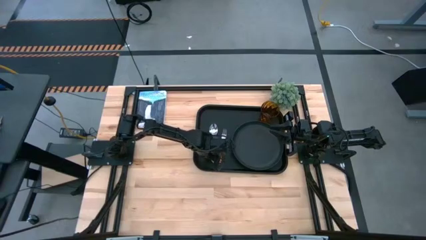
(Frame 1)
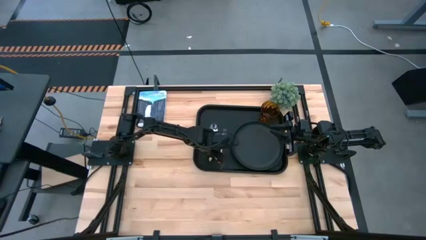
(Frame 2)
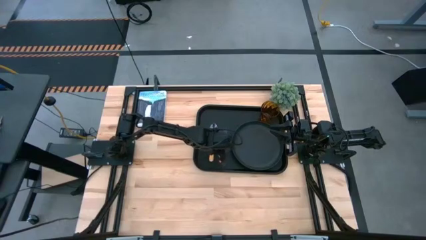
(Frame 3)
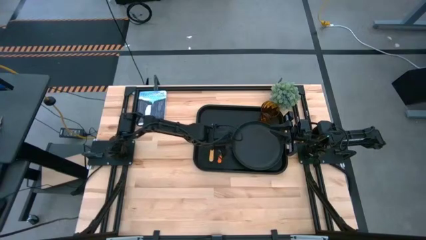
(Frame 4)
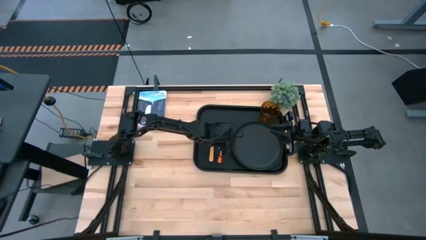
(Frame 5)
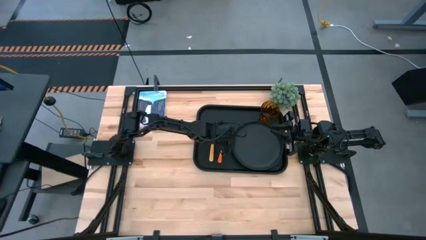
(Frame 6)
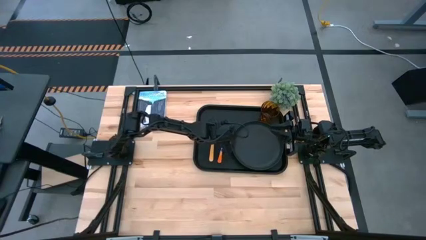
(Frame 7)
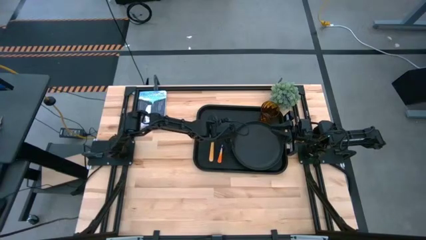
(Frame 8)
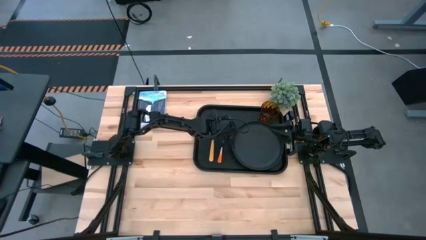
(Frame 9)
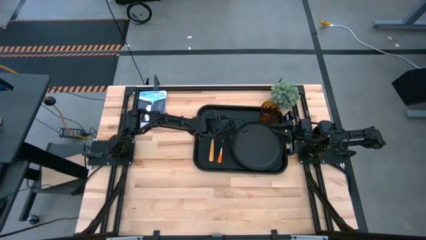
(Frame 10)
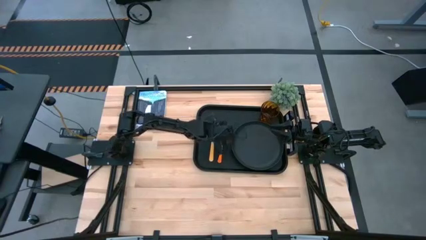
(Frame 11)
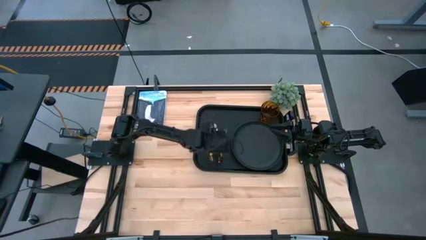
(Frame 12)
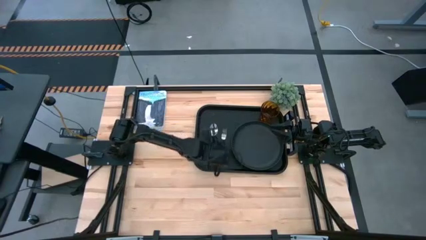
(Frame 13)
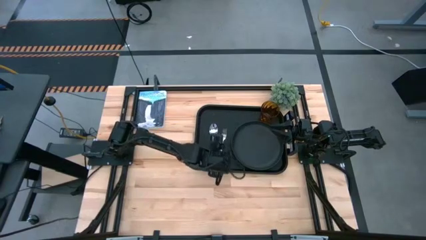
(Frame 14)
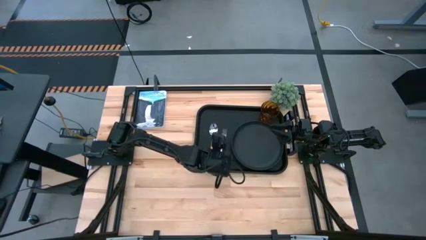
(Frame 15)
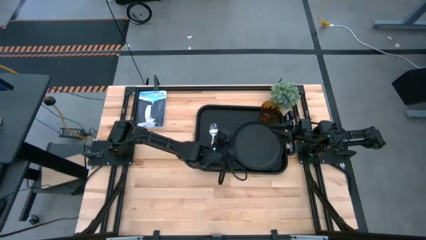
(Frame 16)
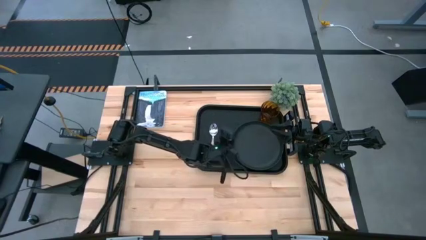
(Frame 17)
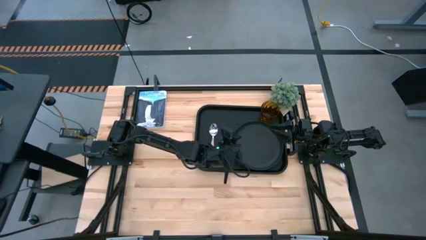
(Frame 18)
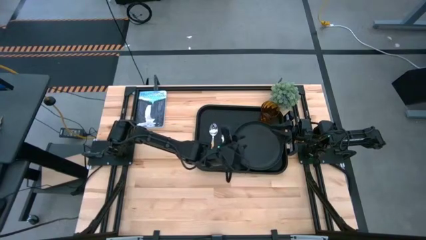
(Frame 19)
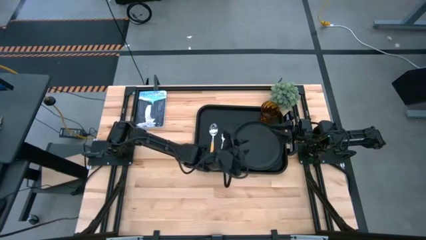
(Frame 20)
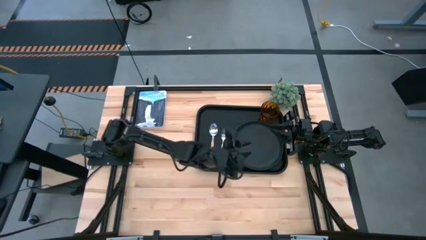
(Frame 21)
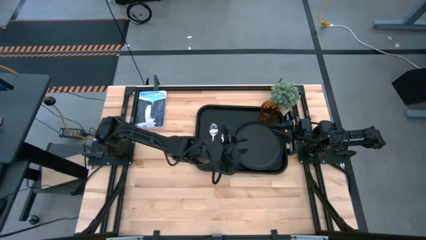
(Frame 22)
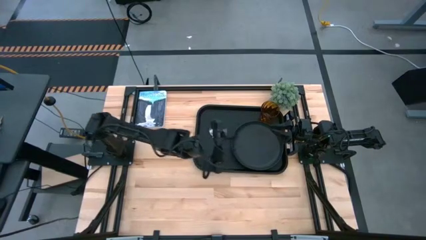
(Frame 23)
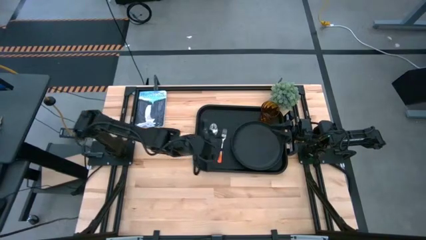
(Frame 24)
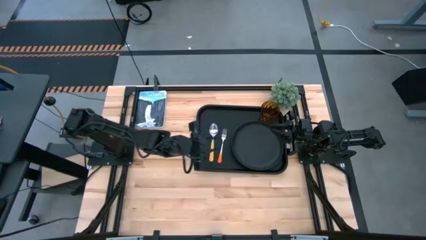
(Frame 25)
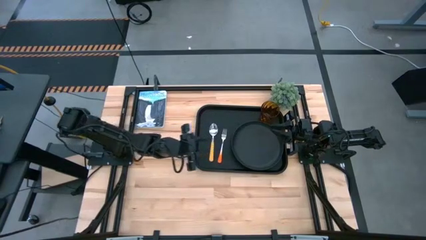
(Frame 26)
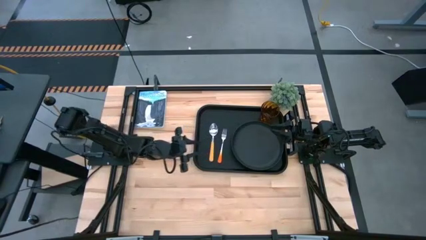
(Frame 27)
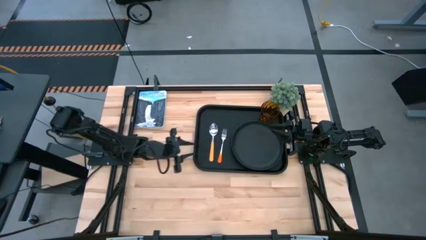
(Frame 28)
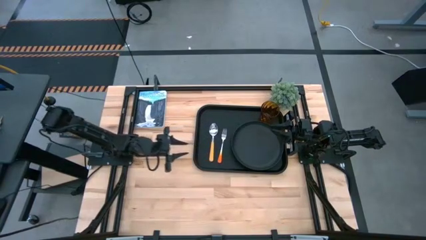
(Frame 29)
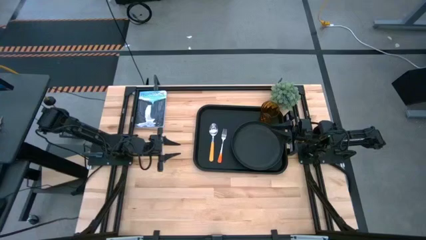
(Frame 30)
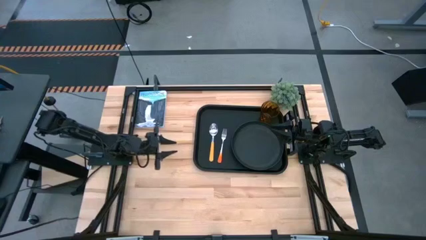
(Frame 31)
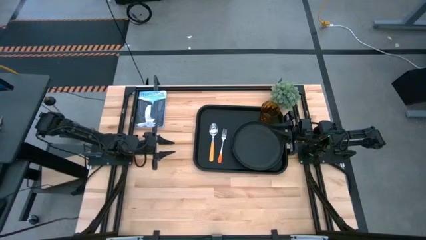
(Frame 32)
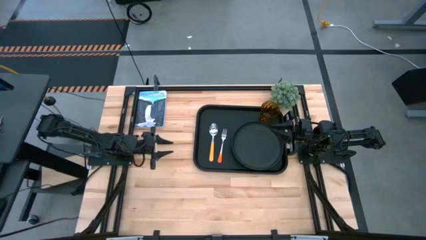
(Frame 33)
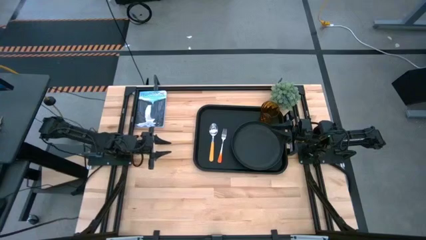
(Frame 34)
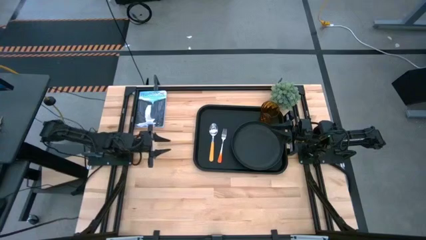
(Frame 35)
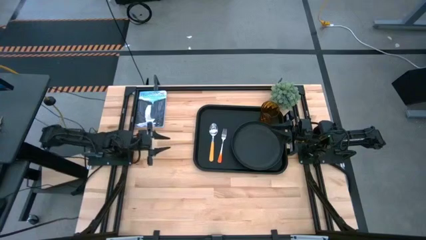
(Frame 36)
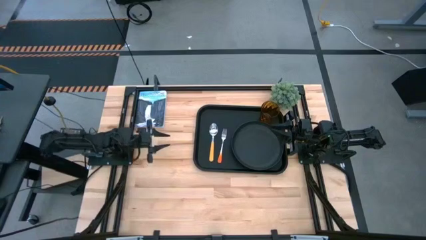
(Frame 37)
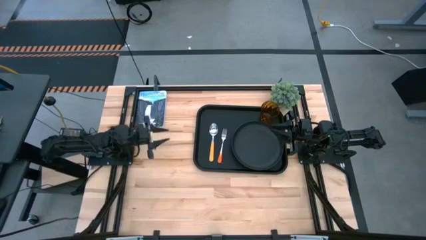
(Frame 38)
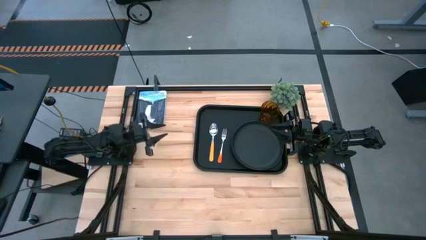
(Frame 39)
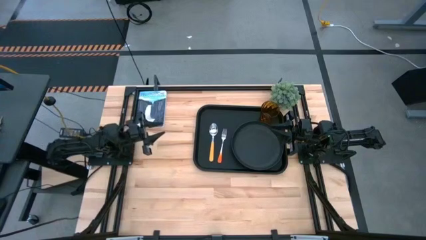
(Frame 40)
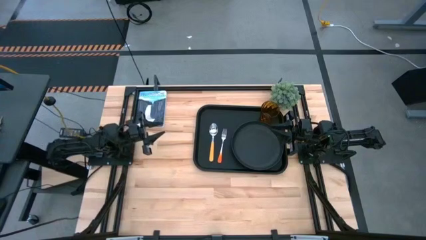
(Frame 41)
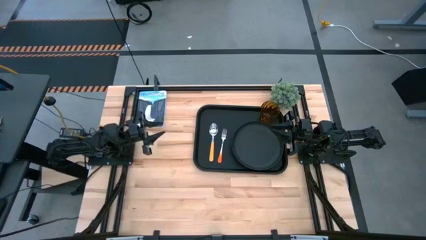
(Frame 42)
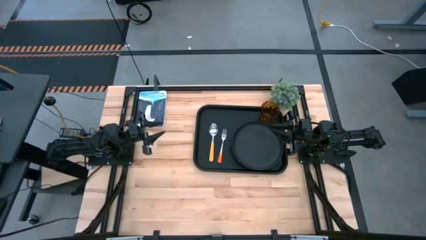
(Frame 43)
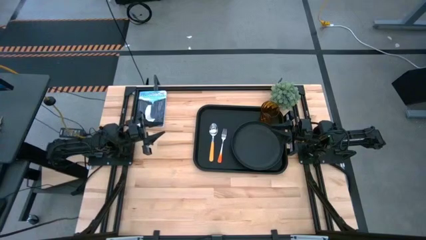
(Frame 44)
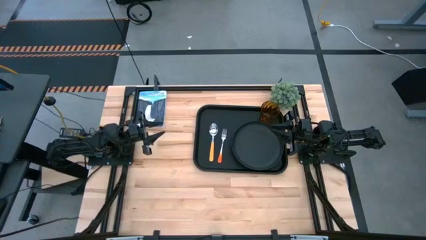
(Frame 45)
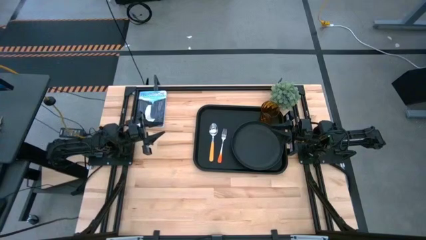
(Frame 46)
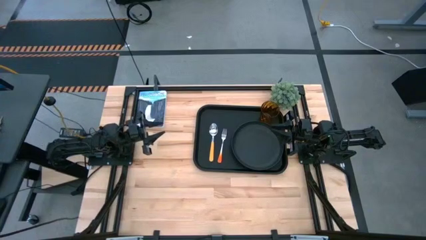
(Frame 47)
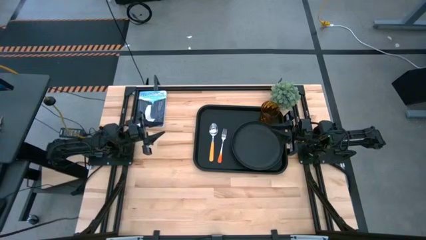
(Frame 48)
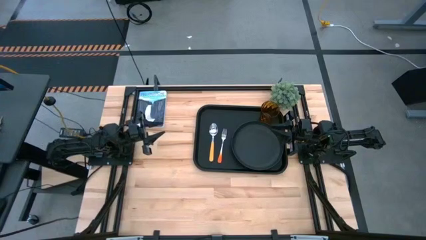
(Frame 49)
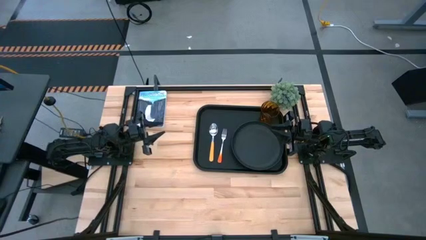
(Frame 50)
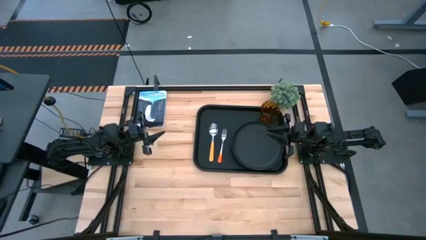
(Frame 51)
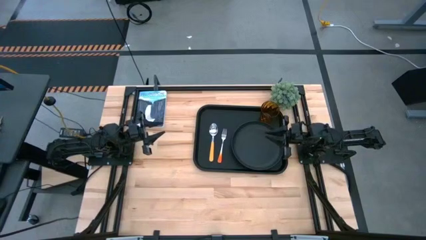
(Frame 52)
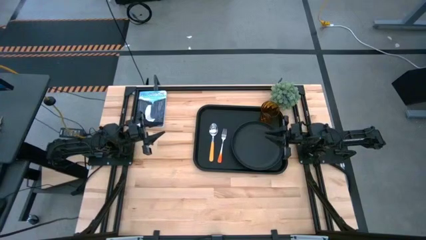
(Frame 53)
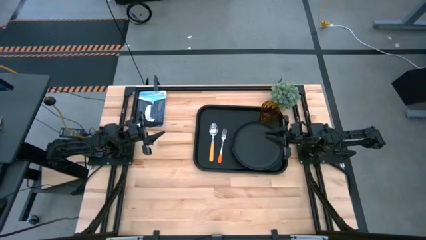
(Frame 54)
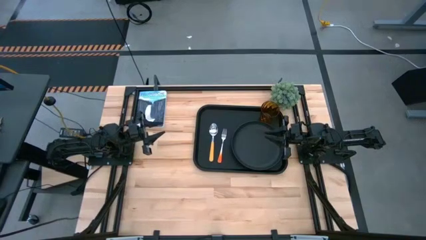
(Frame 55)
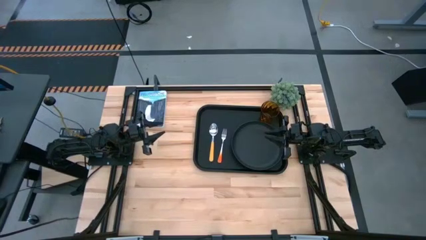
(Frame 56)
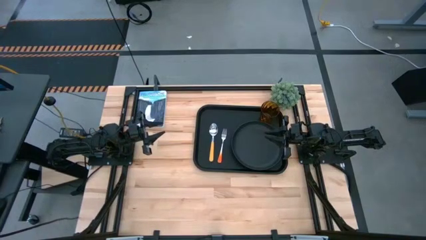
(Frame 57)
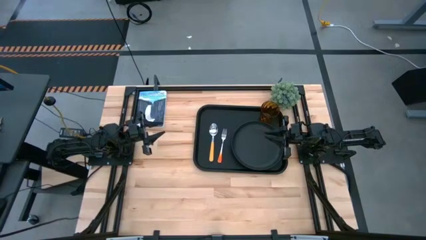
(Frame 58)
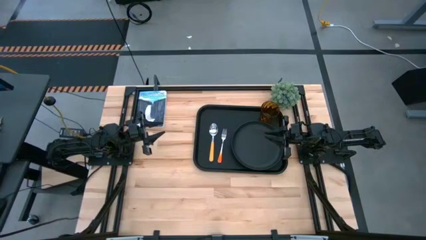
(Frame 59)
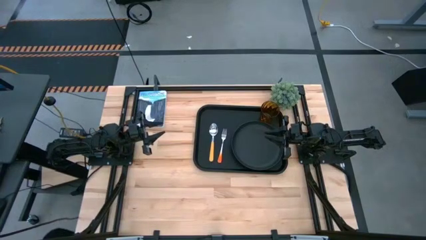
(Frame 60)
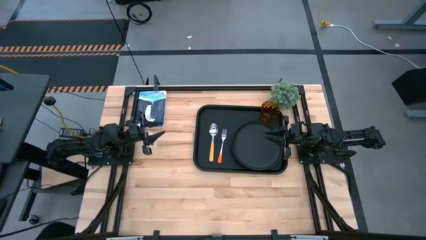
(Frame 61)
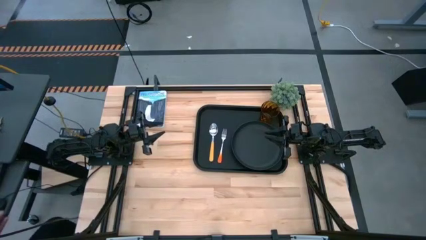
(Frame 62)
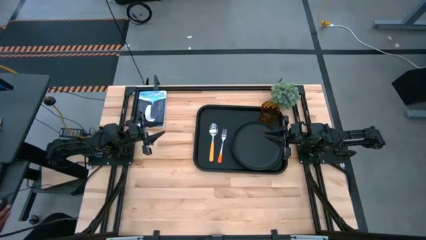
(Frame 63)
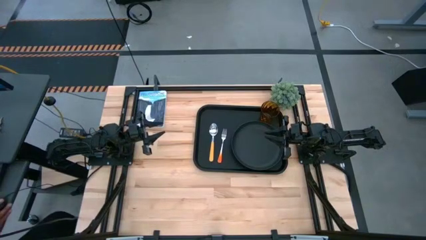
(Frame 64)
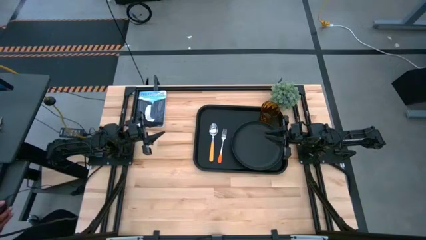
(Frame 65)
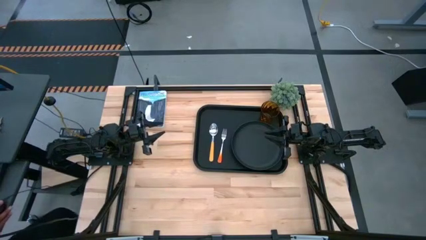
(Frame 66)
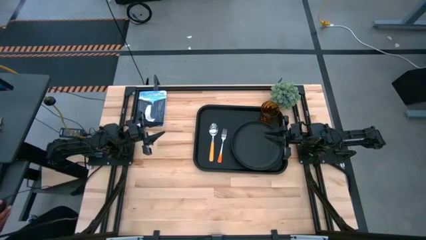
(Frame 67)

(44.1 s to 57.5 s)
Task: Pick and place plate/cup/fork/spoon on tray
Return to Home Position
